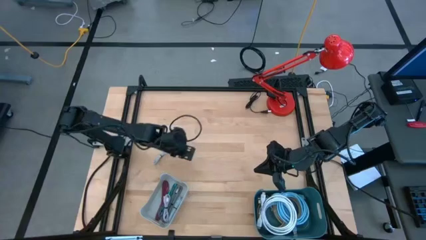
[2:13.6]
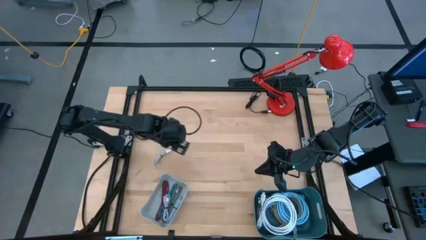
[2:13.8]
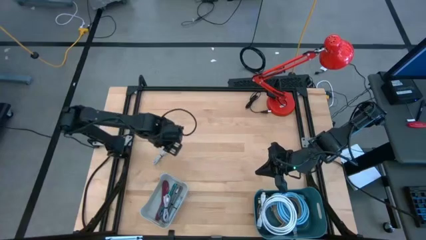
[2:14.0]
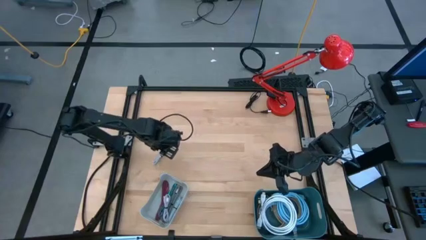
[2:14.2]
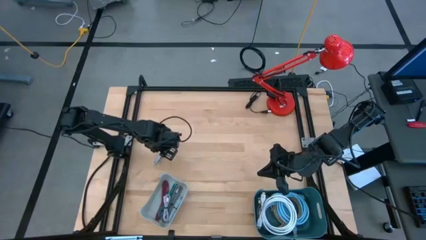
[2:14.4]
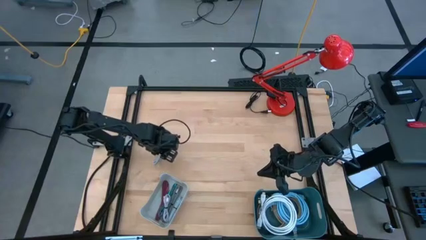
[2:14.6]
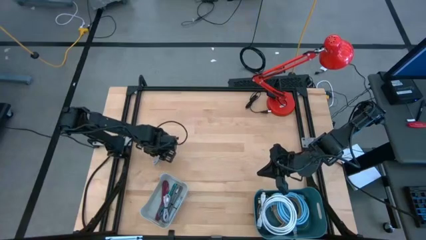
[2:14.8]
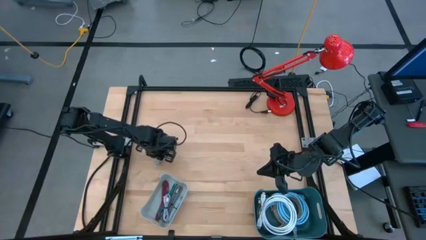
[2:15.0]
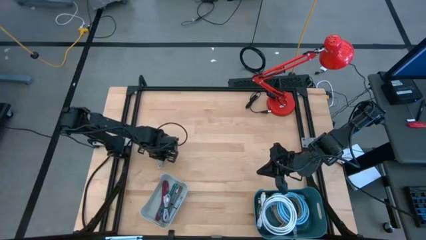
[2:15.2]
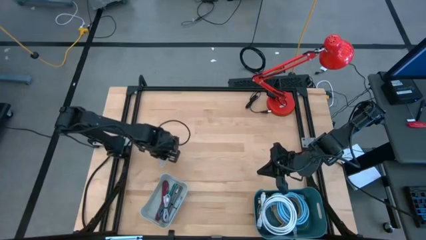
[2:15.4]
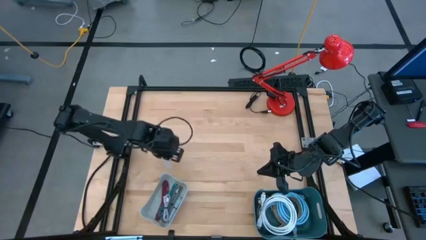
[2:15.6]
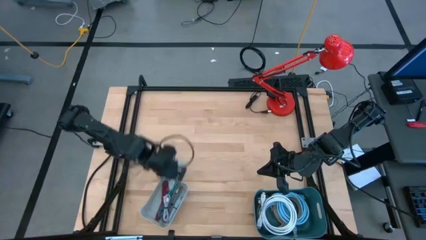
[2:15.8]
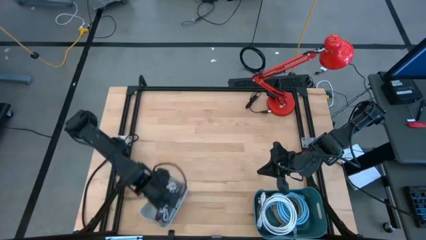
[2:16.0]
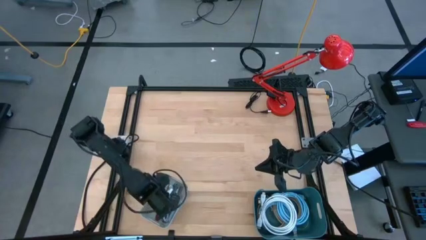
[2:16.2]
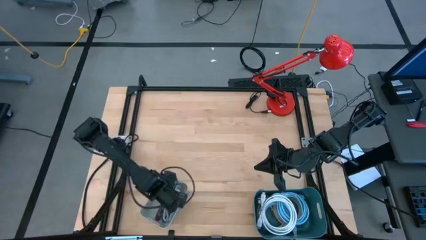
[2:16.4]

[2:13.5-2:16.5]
Task: Pick & Place USB Port
Put the white charger cable into the gray bin

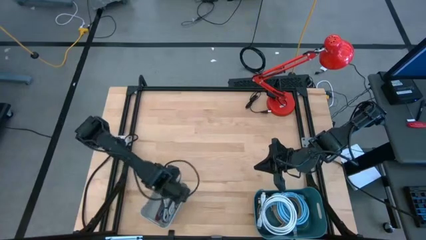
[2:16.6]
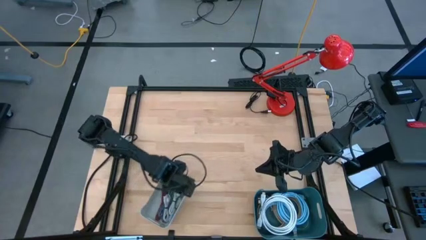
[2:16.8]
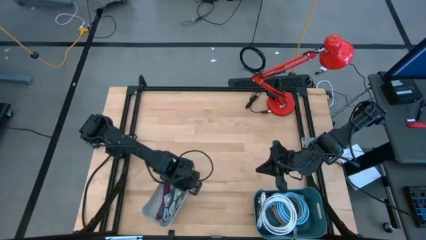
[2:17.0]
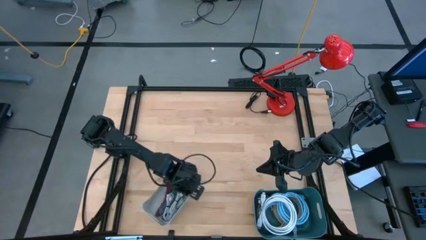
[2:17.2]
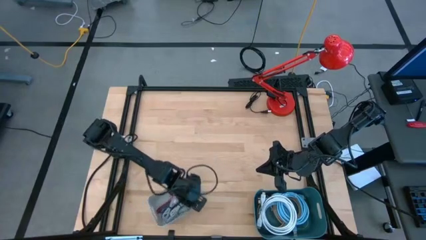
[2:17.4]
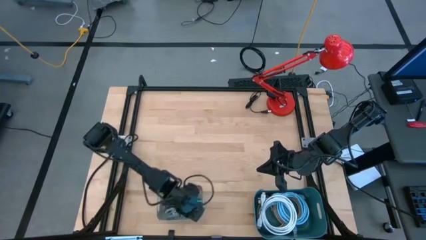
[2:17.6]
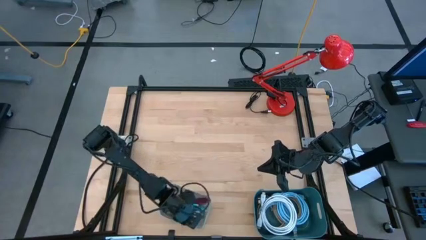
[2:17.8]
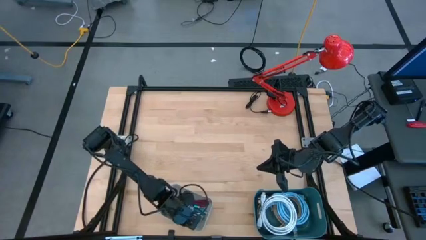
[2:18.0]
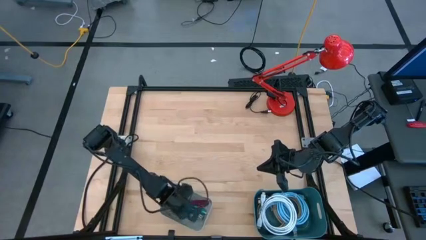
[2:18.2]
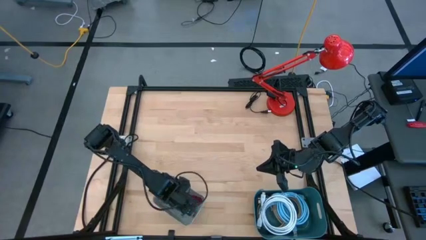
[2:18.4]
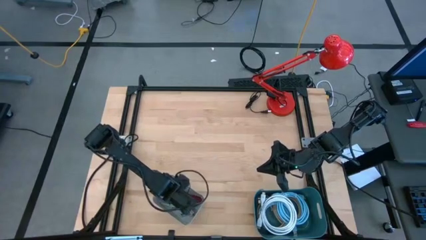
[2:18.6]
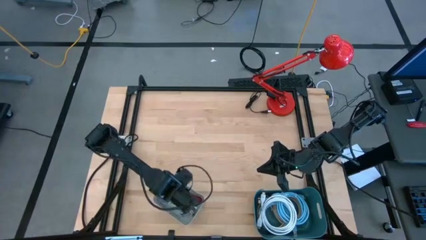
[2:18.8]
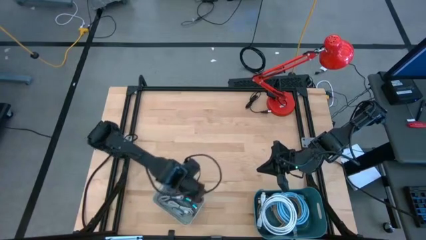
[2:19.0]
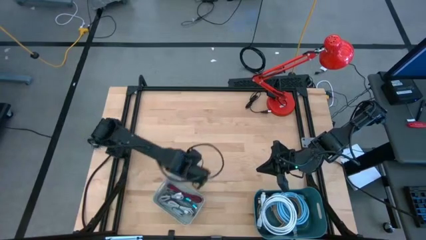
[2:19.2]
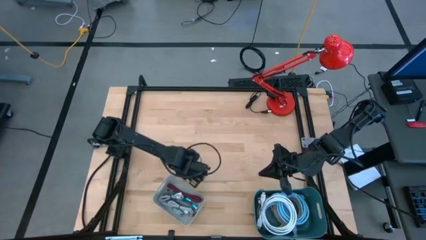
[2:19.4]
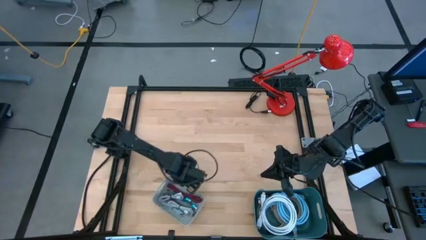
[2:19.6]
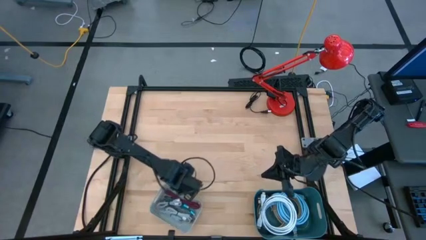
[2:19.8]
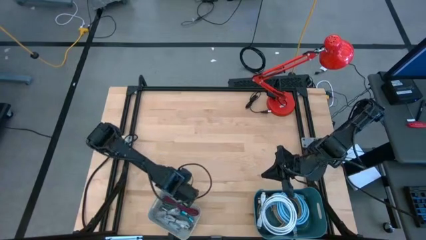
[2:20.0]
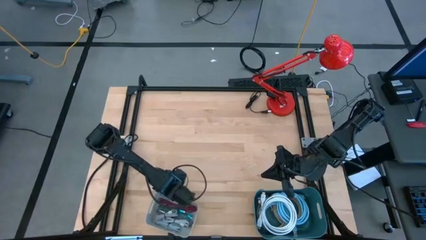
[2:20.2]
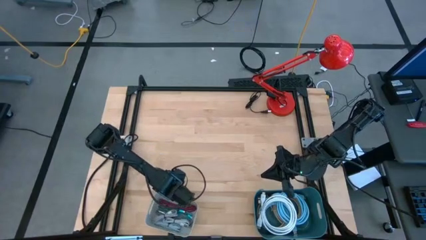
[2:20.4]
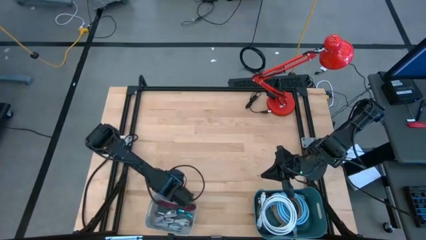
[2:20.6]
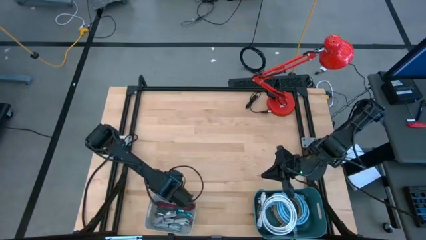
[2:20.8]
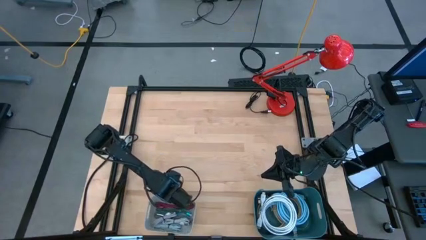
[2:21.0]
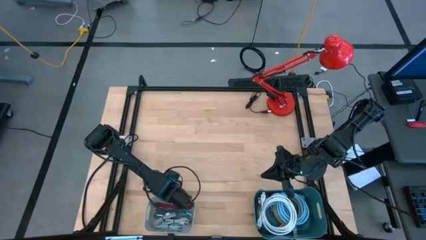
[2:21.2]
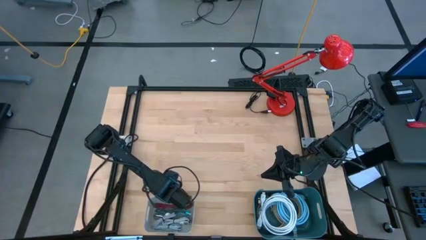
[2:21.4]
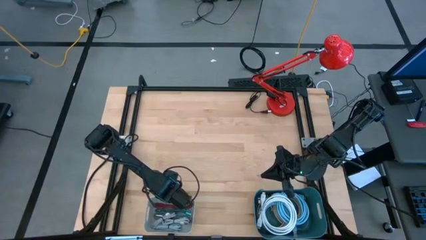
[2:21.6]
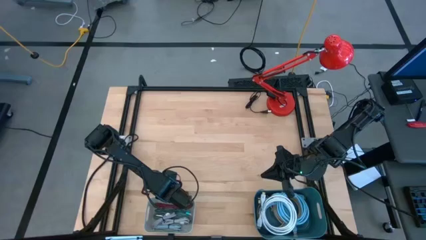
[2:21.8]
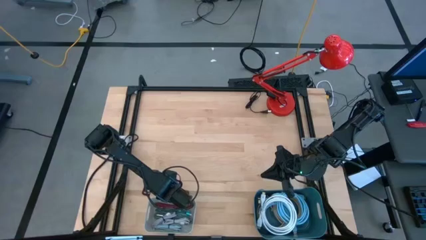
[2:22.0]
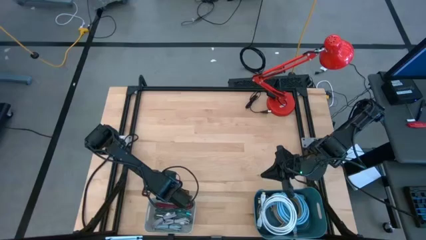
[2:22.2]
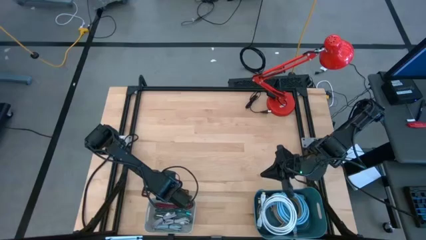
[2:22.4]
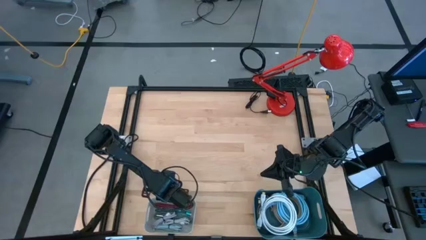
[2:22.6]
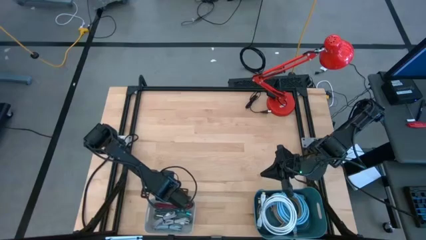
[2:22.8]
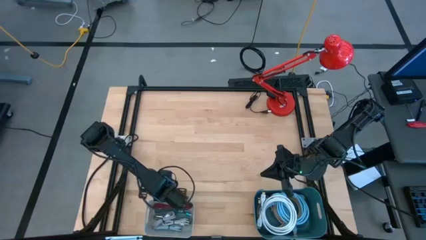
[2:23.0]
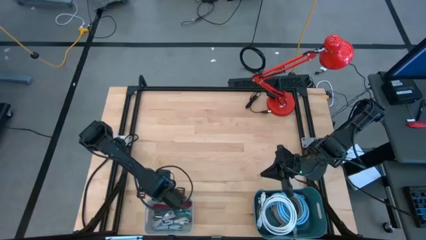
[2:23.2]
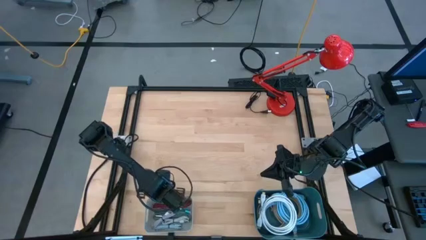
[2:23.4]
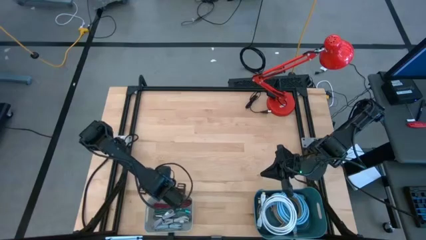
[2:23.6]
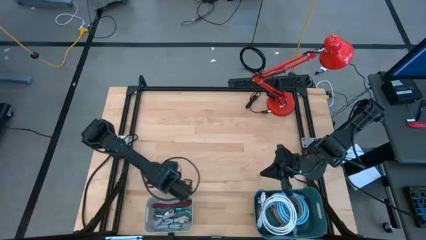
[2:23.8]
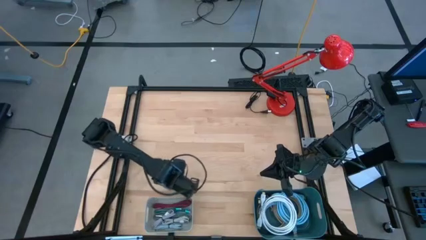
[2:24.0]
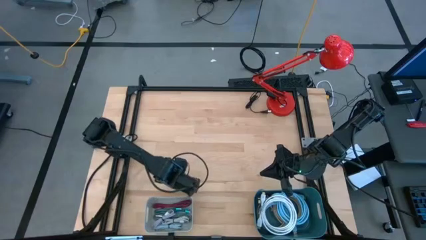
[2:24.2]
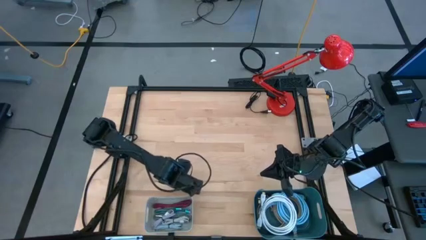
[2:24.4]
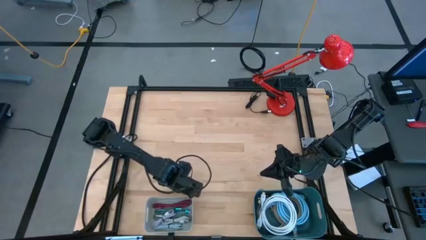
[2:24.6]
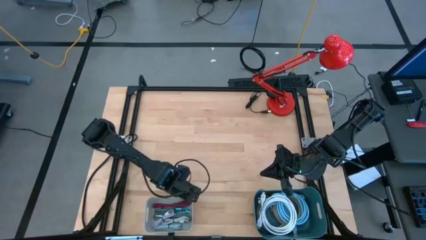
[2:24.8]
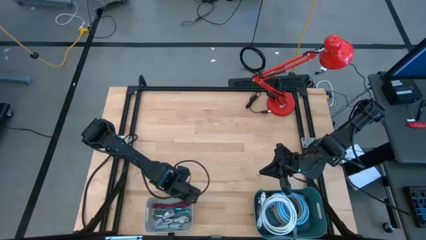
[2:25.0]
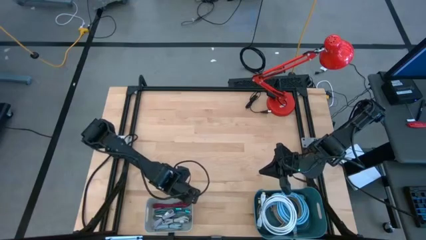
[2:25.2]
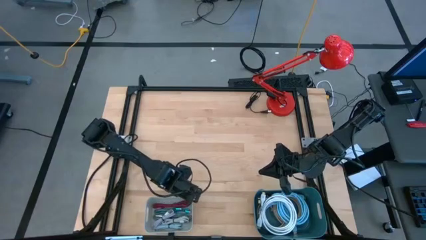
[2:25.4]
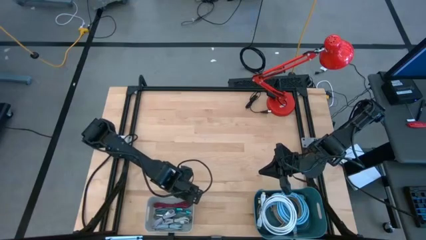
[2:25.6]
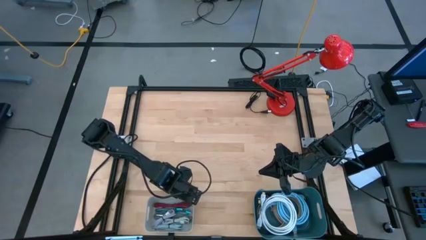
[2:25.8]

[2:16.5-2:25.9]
Adjust the gray bin

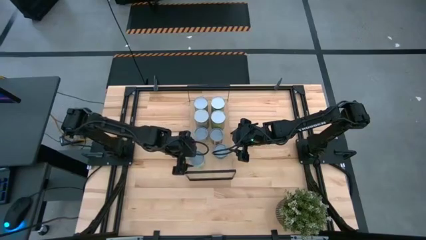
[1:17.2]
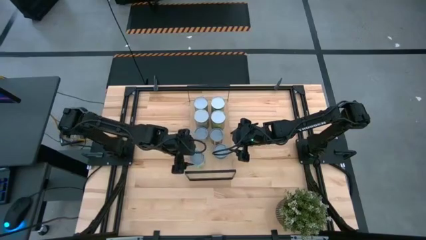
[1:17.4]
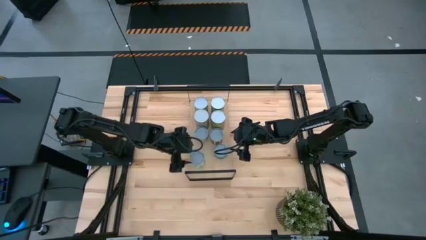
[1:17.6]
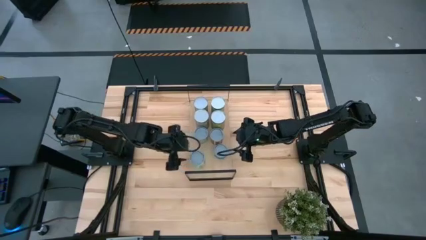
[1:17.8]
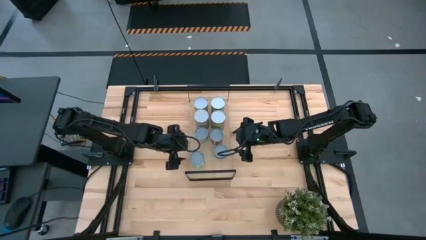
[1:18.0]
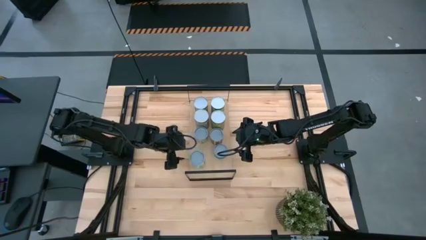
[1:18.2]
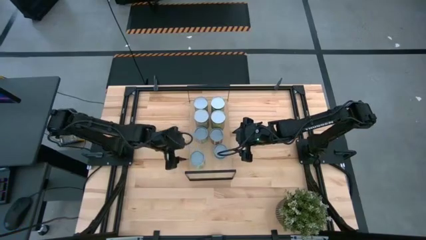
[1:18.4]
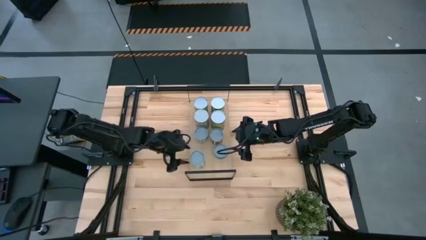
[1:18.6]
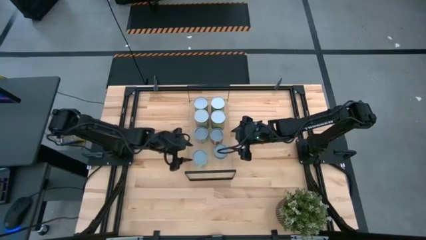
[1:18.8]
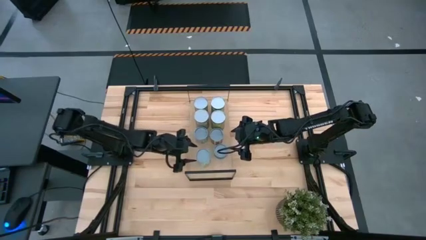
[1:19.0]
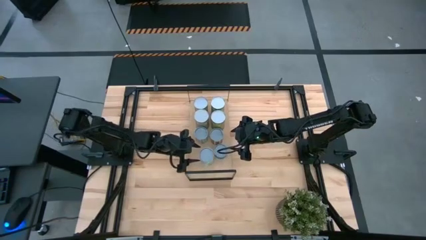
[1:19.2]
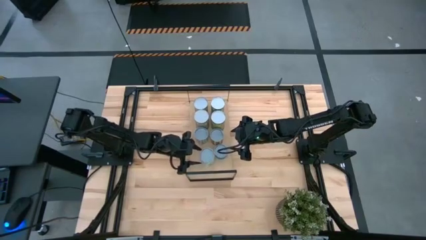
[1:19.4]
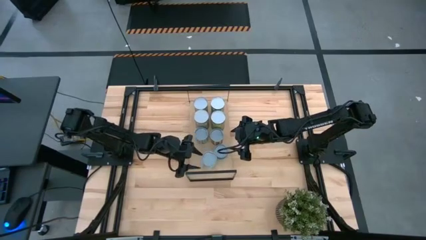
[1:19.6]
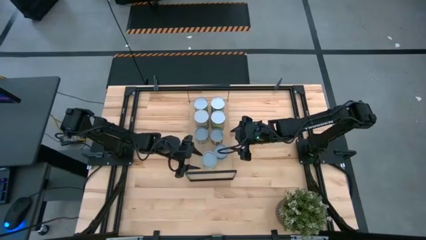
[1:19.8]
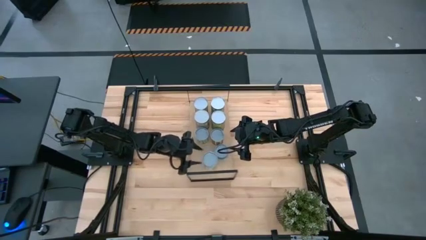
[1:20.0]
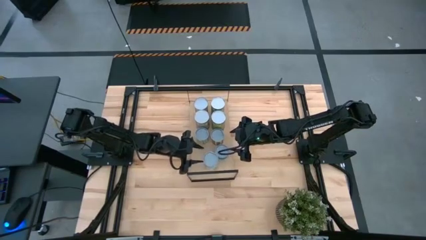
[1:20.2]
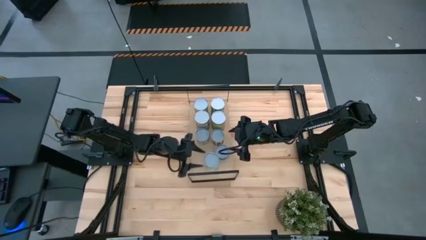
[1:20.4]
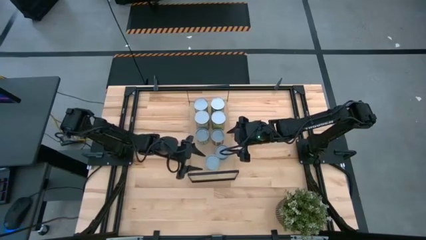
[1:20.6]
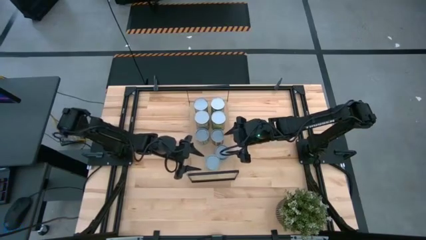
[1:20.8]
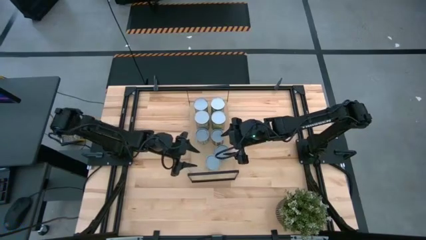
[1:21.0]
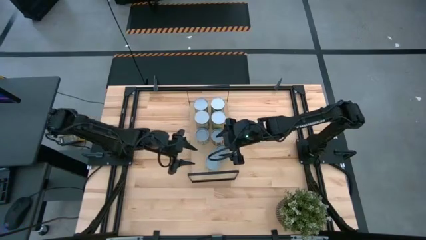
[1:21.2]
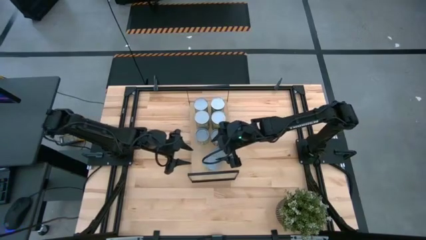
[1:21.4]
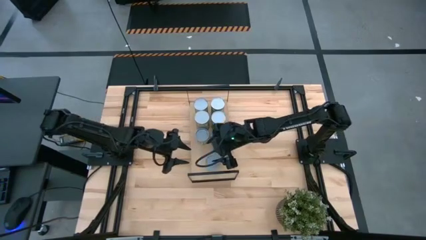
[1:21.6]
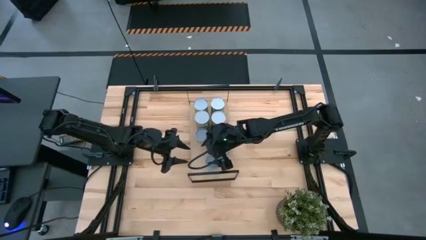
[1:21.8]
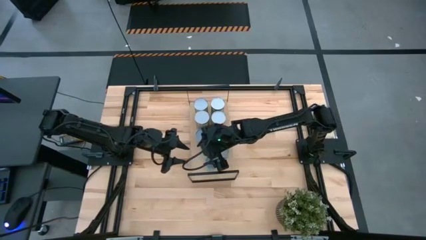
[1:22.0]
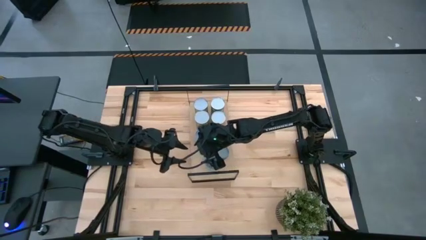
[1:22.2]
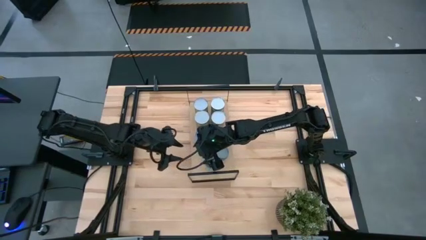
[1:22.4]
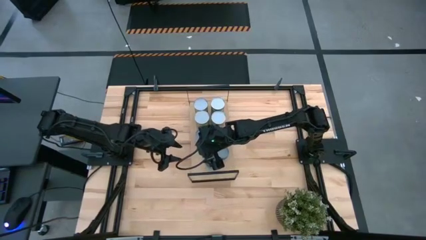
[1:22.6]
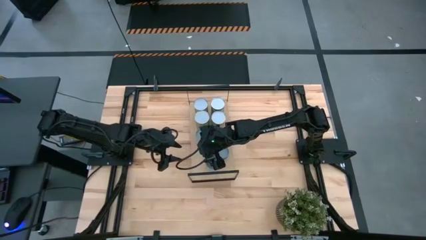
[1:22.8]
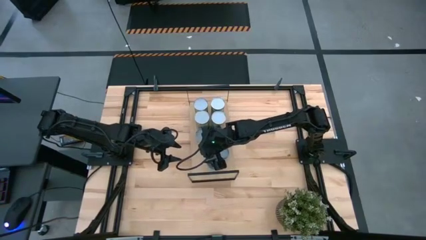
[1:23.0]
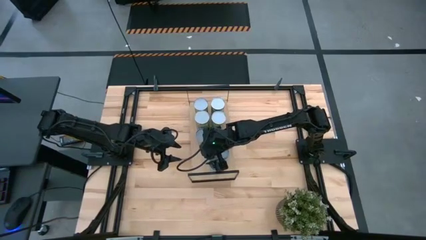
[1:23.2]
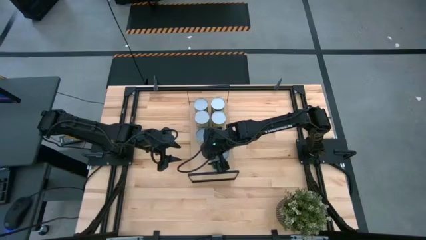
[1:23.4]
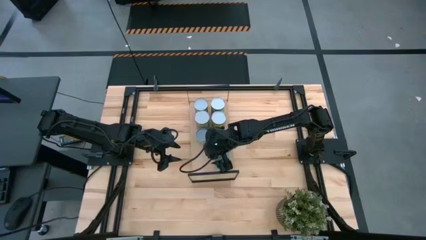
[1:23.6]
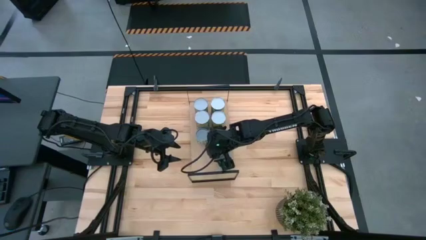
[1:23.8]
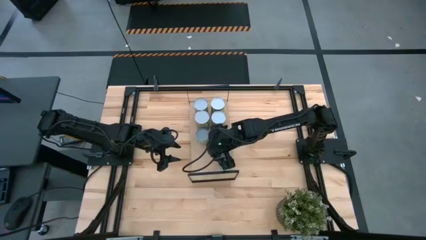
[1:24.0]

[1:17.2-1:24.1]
Task: Pick and place cans onto a shelf
Adjust the canned mixed vegetable on the shelf
